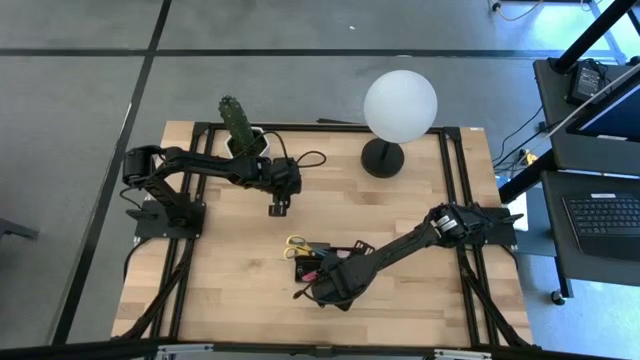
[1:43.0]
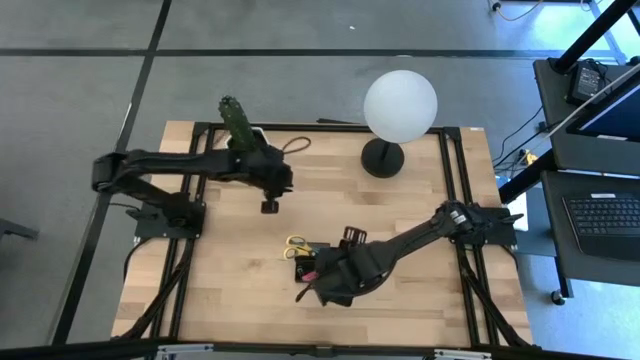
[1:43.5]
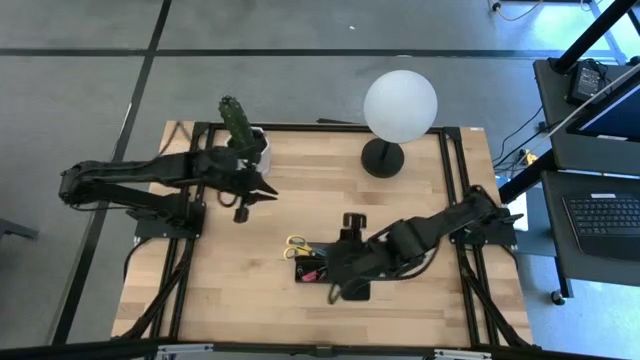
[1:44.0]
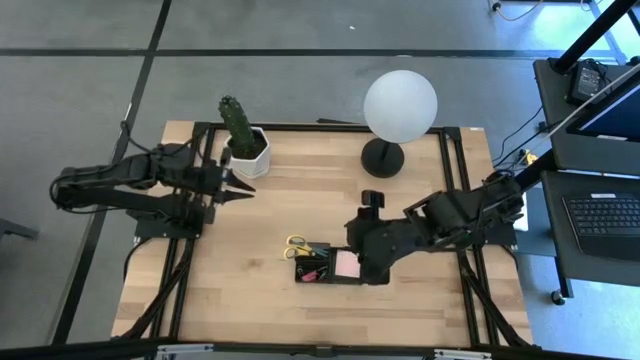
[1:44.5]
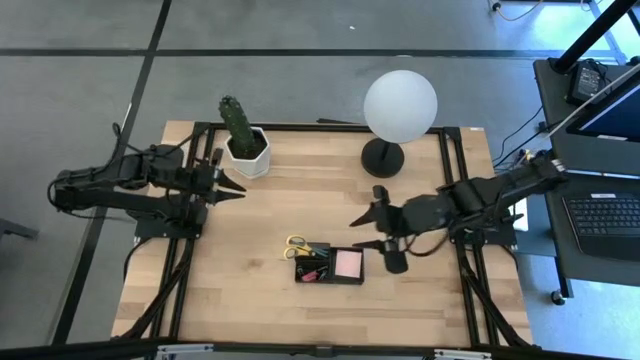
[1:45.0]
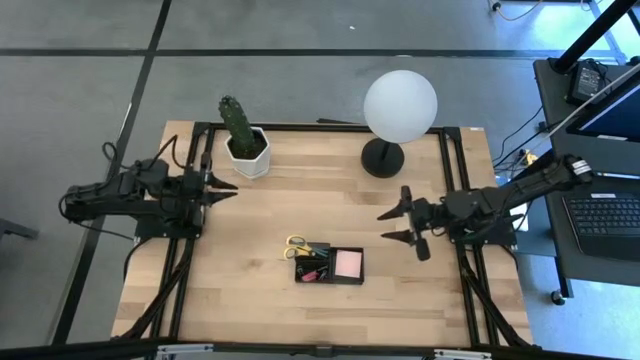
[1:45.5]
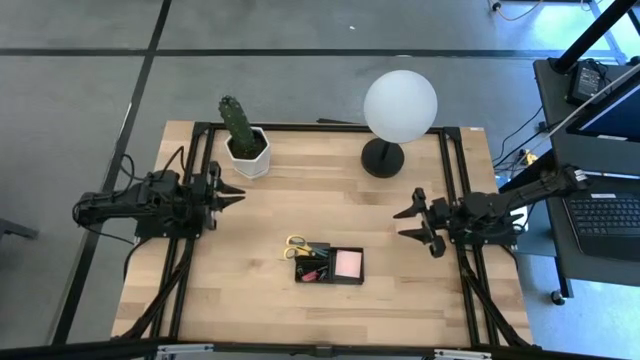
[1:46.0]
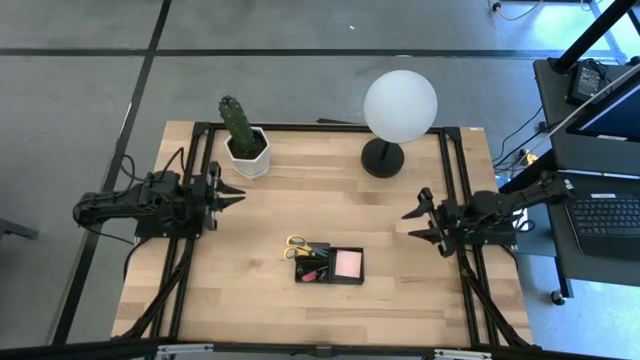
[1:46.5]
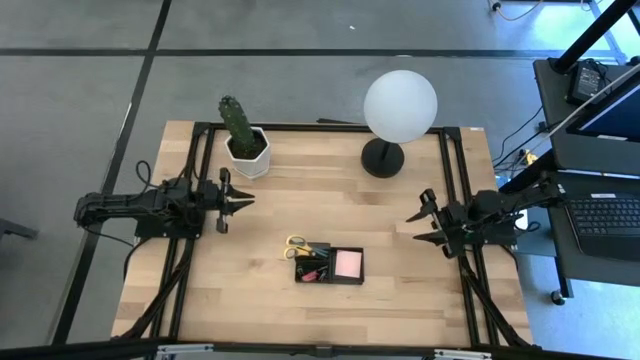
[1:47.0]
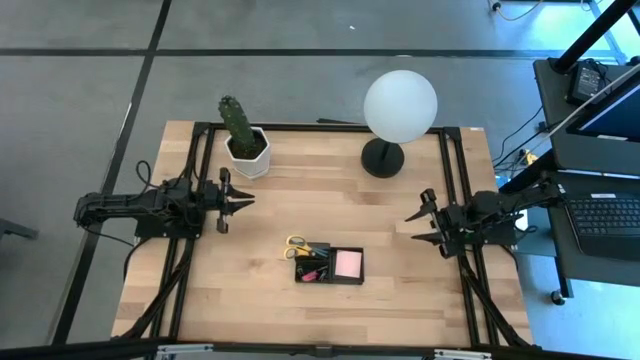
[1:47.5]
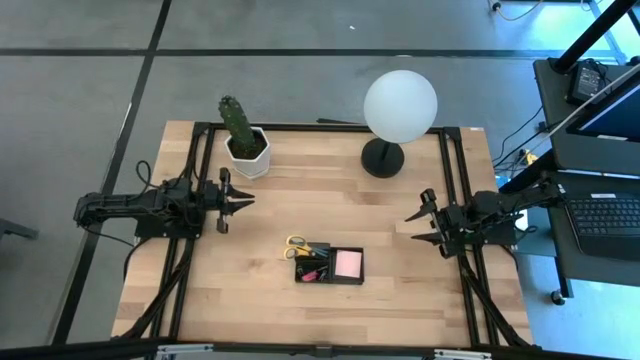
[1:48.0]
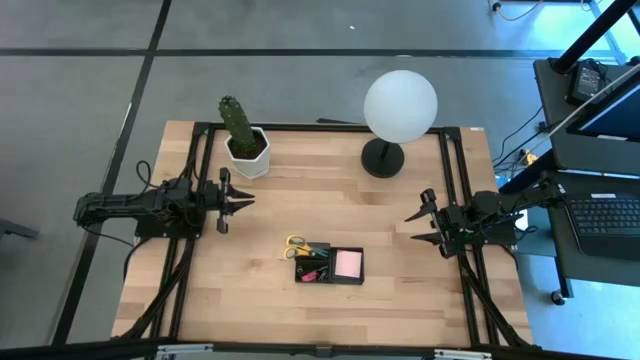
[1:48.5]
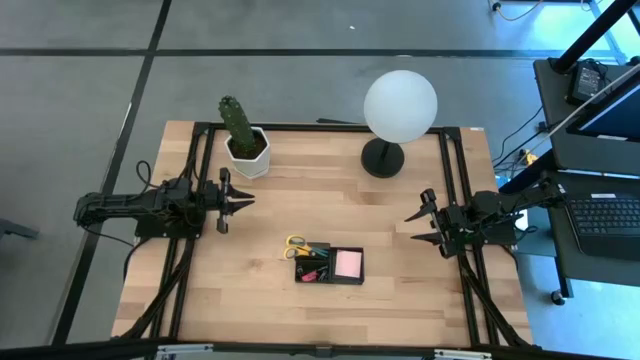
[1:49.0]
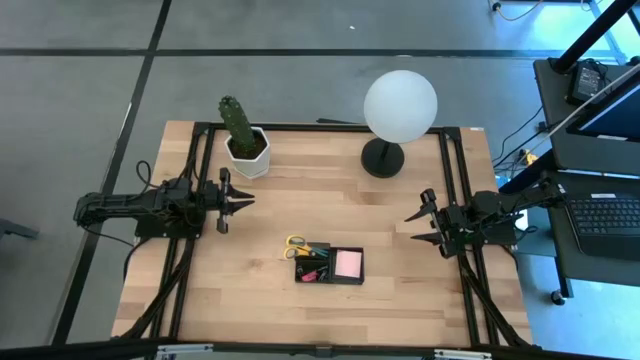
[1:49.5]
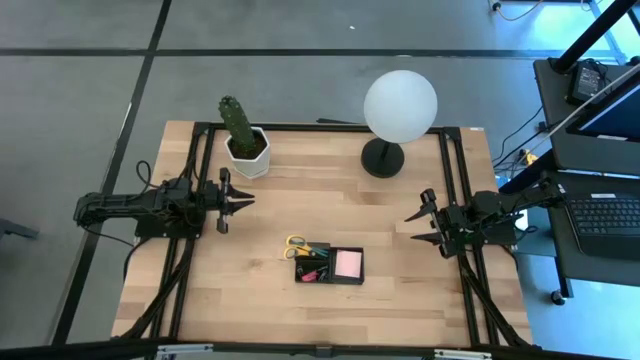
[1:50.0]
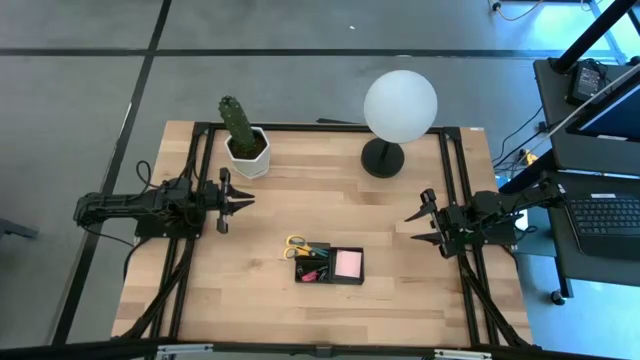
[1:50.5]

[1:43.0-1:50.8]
Task: Pick and place office supplies into organizer
Return to Home Position

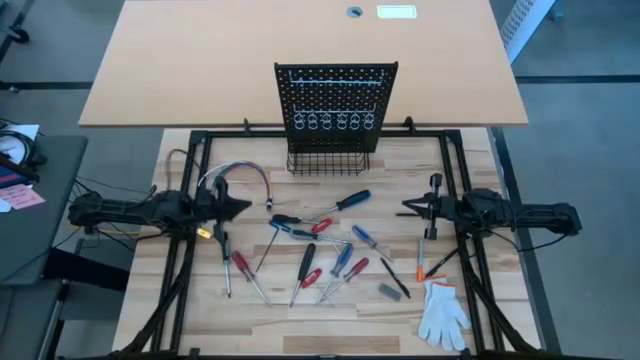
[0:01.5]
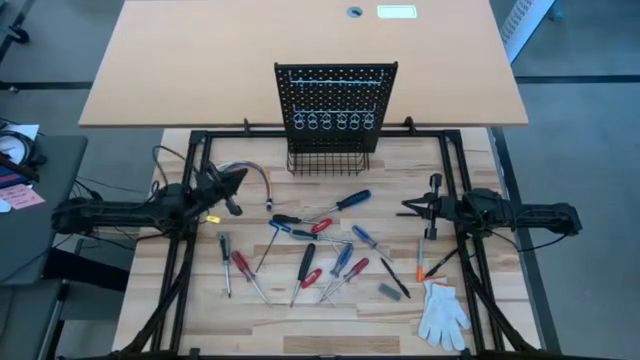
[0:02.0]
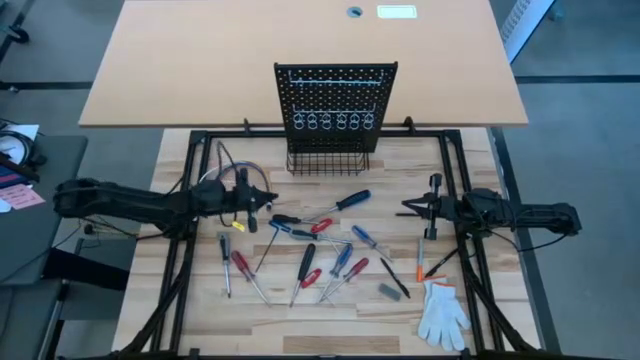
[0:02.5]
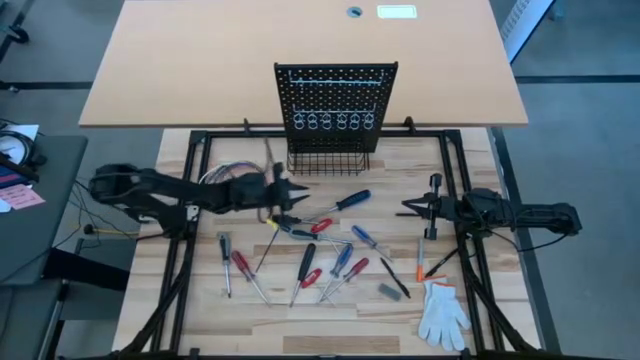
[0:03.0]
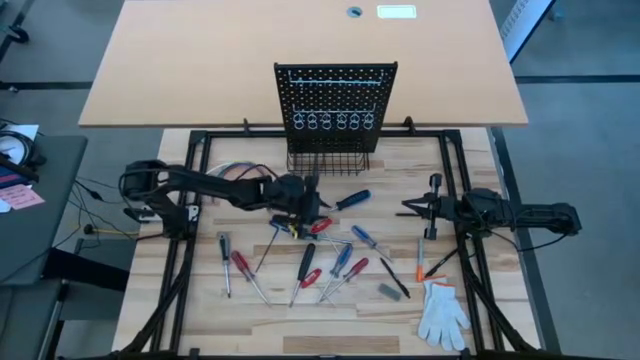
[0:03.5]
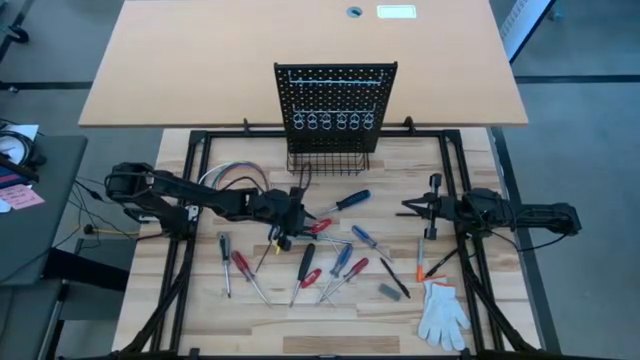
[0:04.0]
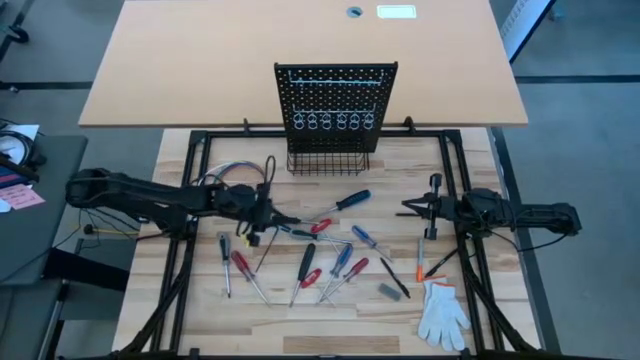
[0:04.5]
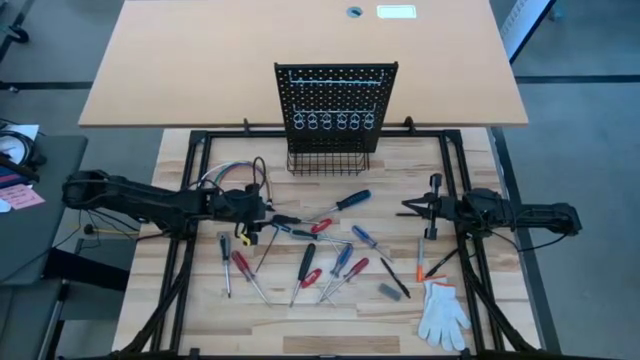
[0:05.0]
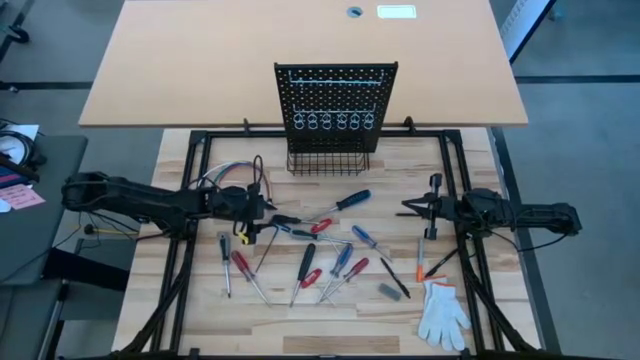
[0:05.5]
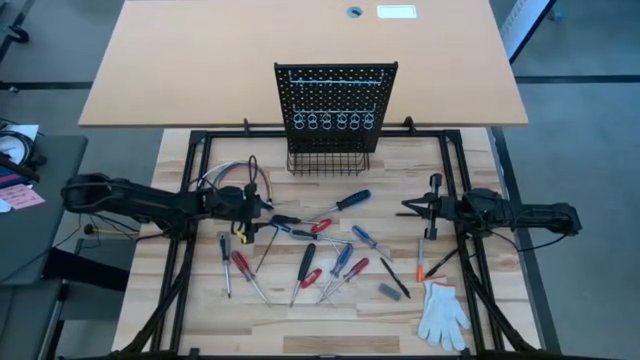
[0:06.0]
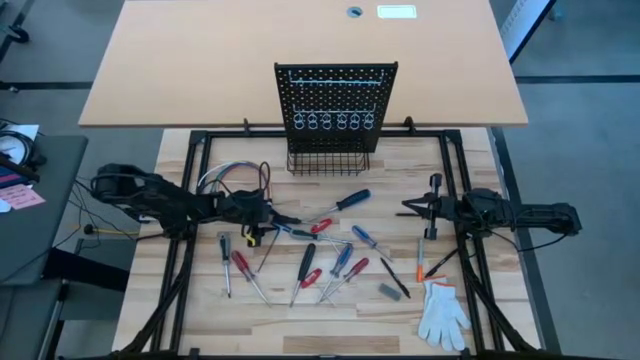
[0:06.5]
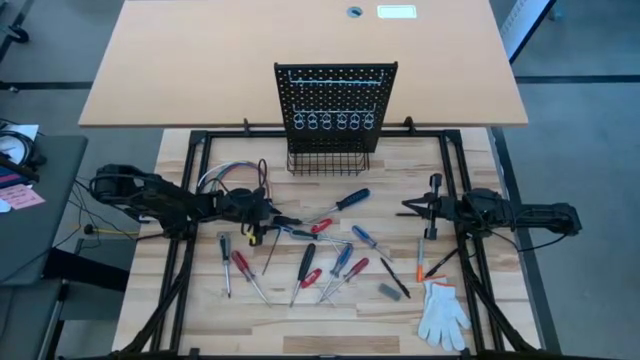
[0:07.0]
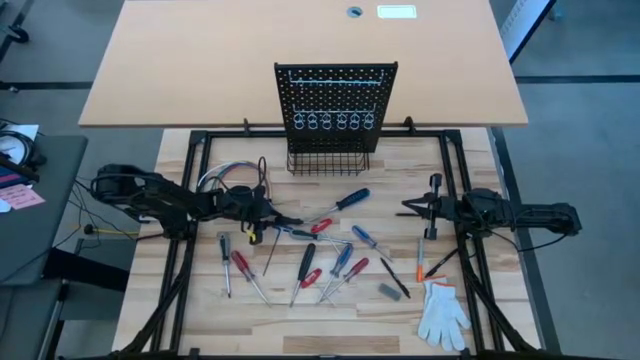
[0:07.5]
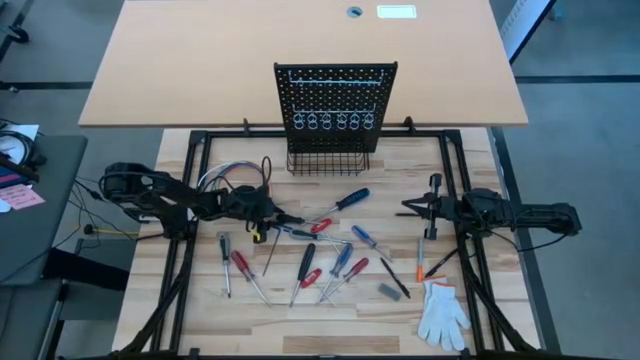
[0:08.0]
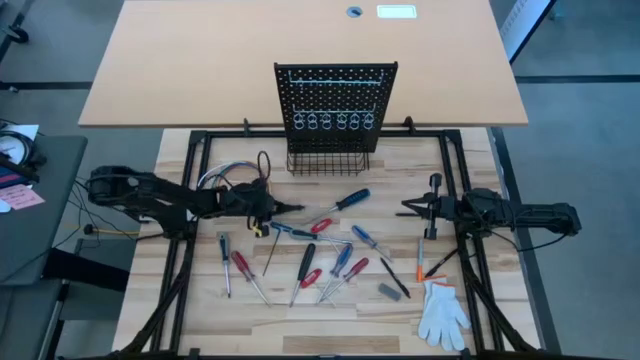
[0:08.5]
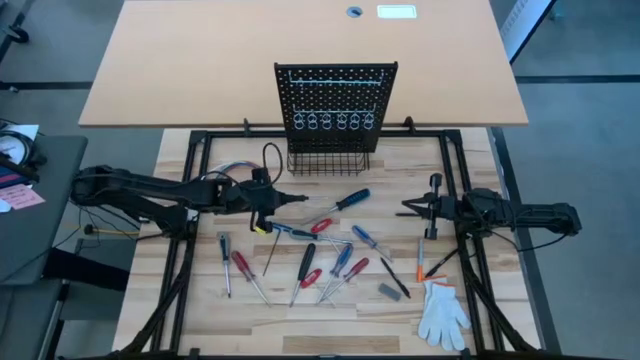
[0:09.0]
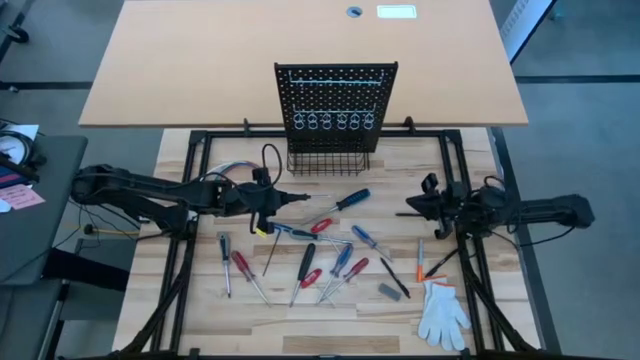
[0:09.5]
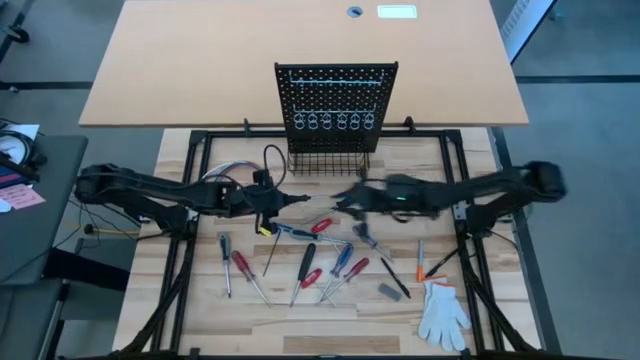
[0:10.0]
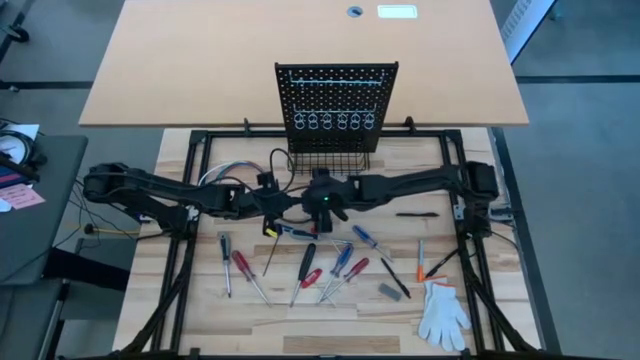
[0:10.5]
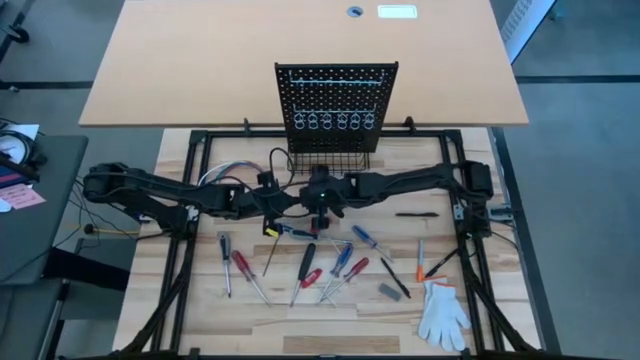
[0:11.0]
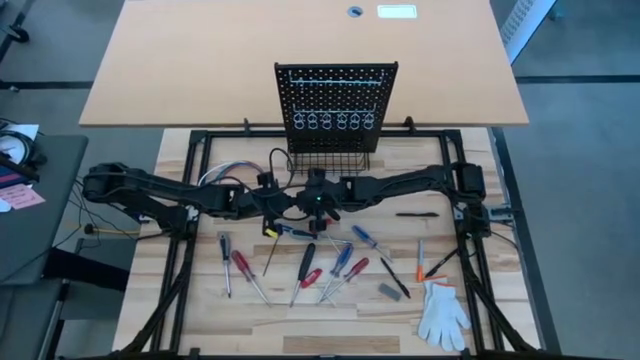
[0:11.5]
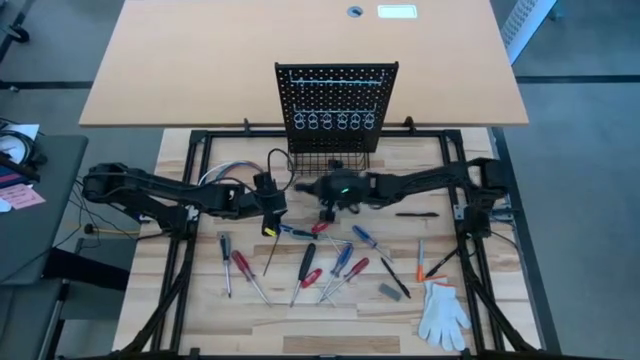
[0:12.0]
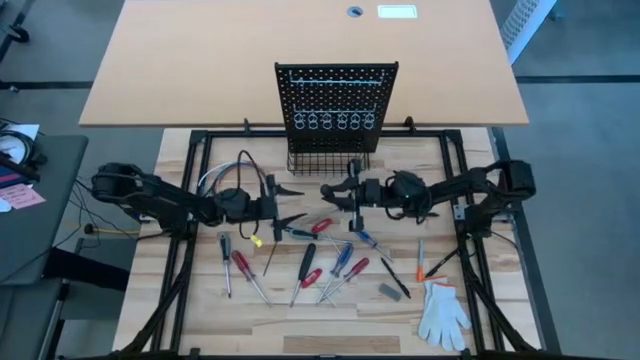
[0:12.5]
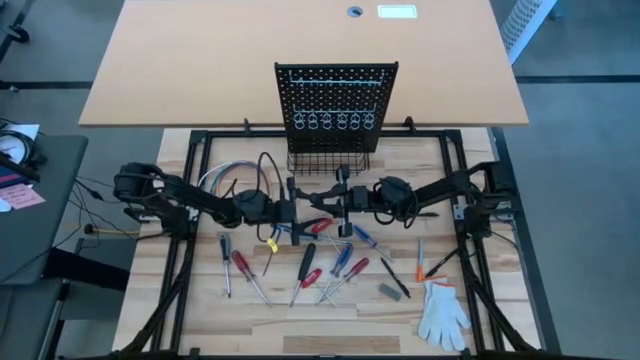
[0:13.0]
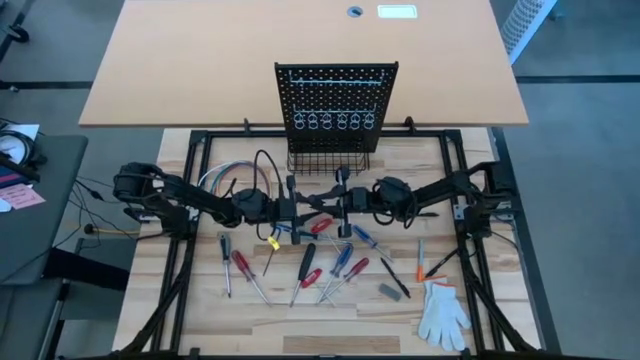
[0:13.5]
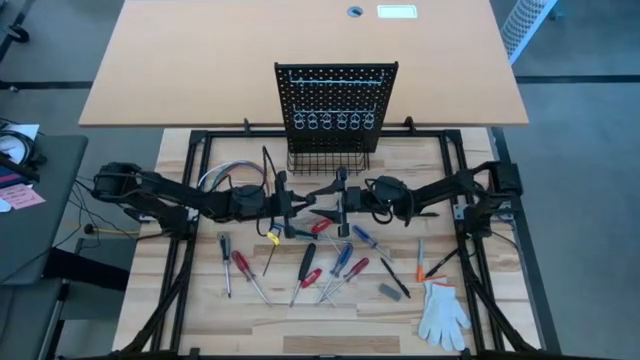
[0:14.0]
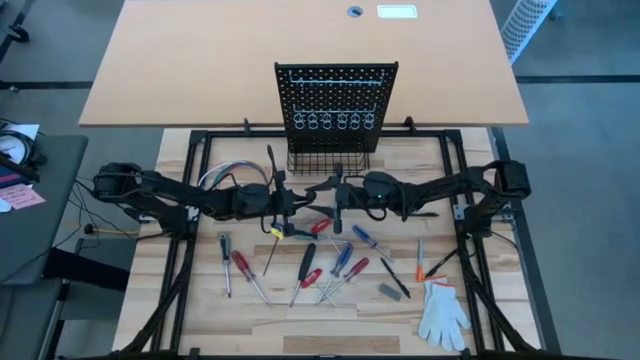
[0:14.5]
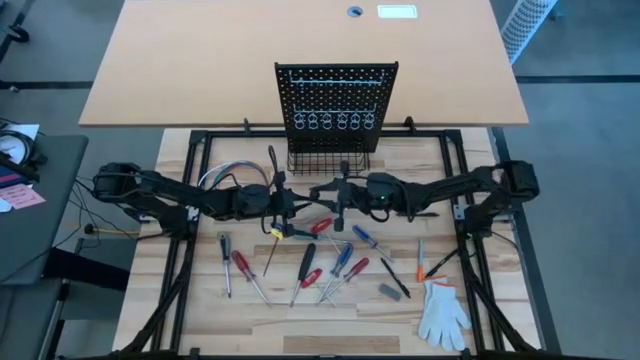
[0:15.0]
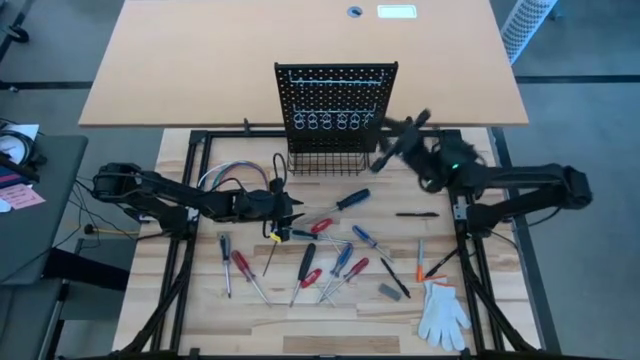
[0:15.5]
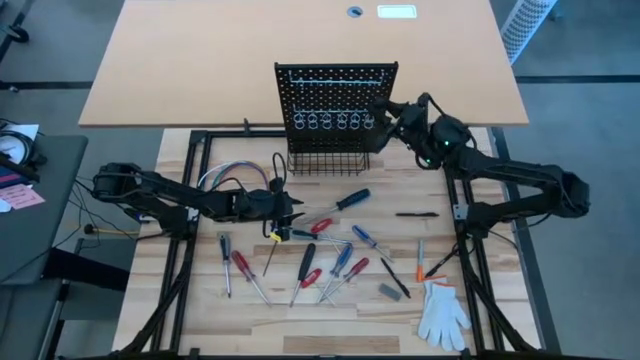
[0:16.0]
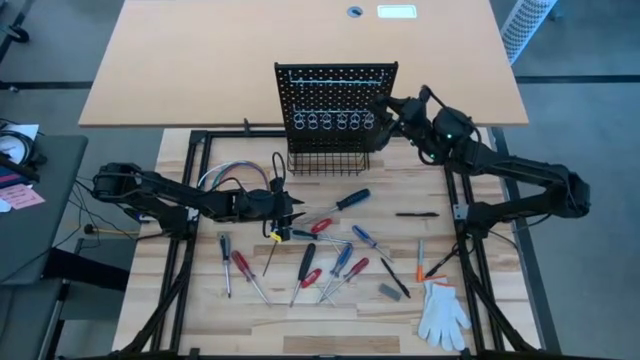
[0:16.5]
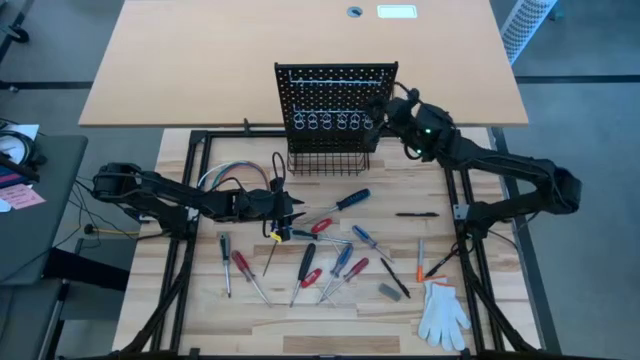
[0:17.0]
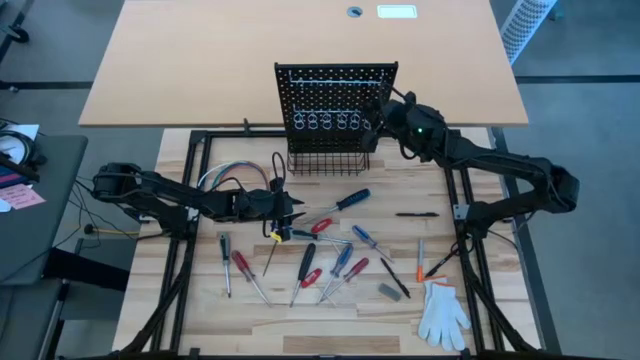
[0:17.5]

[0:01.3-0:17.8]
Task: Hang tools onto peg board
Hang the top black screwdriver on the black peg board
